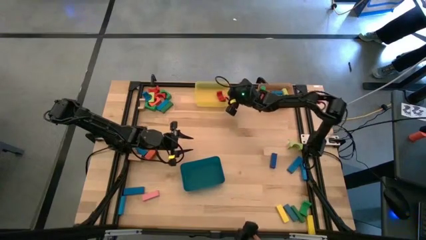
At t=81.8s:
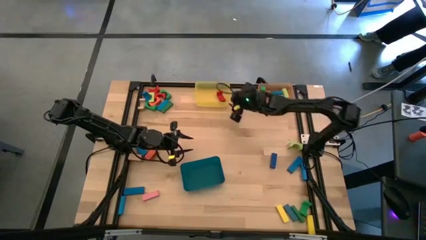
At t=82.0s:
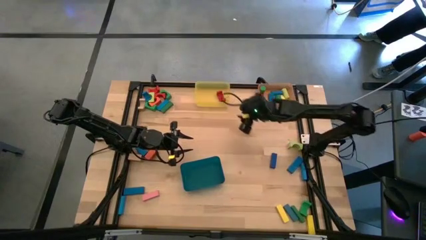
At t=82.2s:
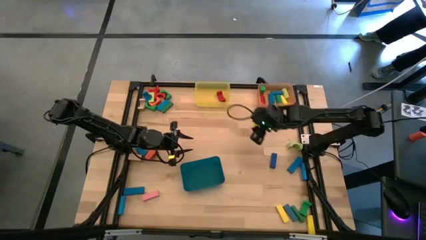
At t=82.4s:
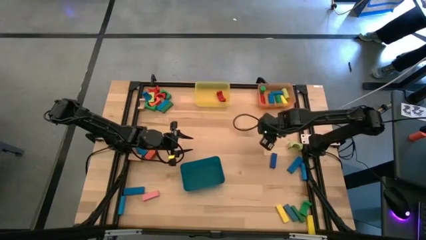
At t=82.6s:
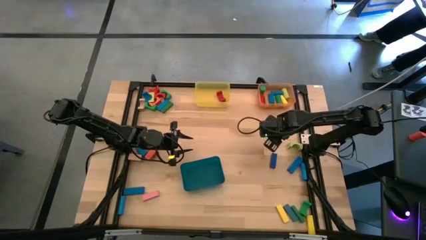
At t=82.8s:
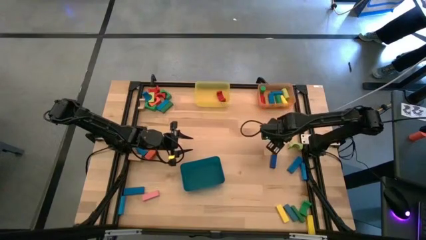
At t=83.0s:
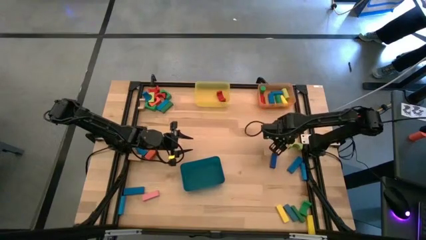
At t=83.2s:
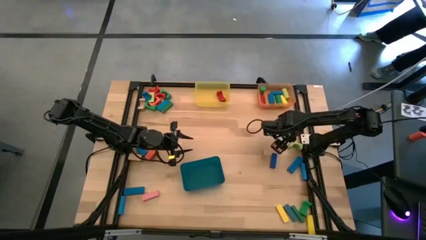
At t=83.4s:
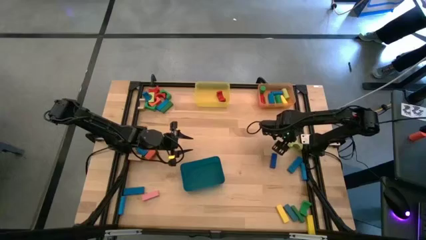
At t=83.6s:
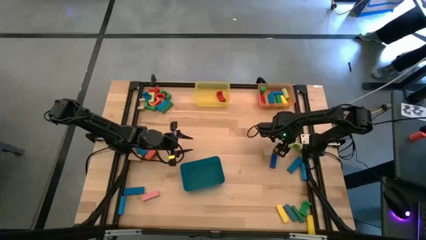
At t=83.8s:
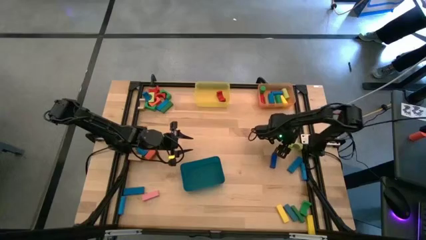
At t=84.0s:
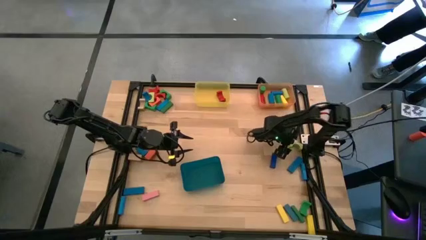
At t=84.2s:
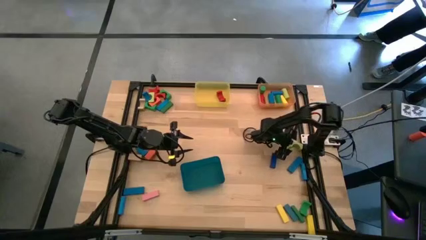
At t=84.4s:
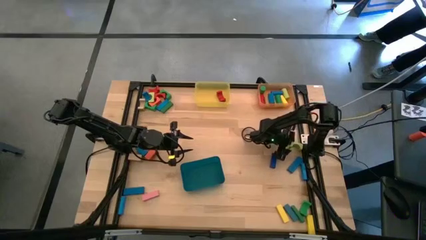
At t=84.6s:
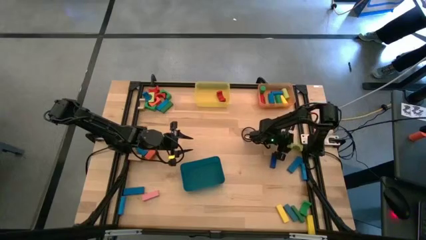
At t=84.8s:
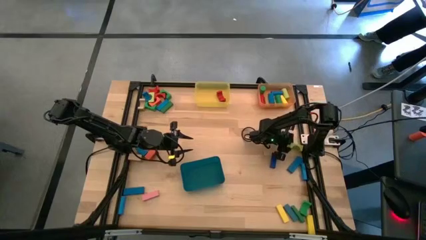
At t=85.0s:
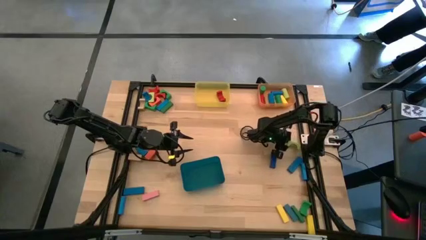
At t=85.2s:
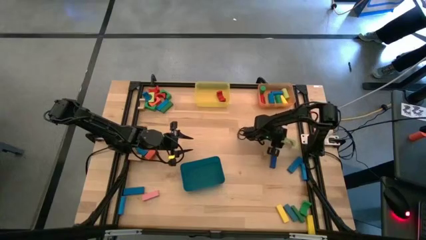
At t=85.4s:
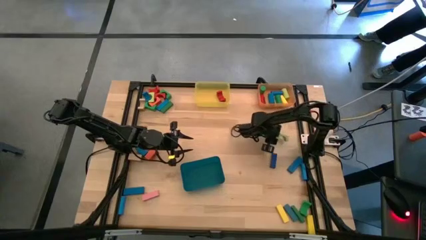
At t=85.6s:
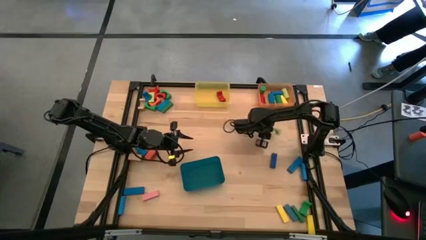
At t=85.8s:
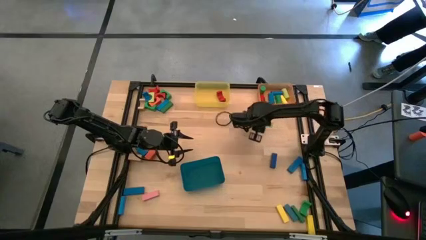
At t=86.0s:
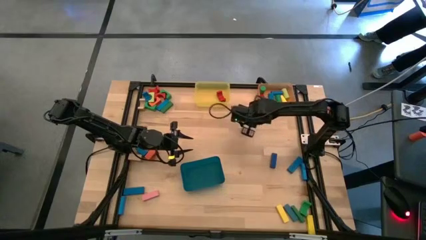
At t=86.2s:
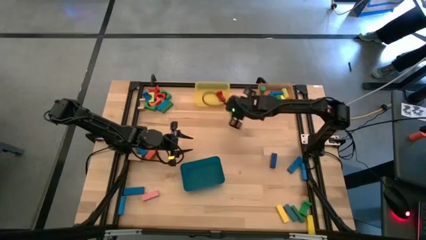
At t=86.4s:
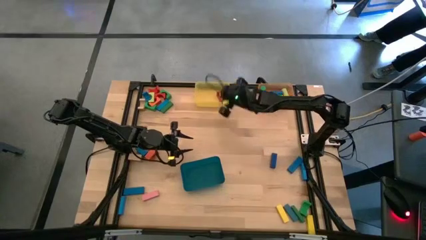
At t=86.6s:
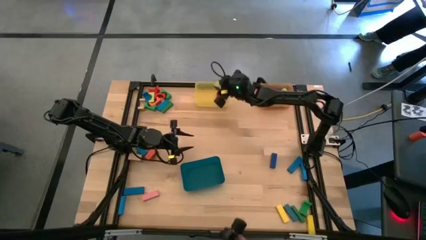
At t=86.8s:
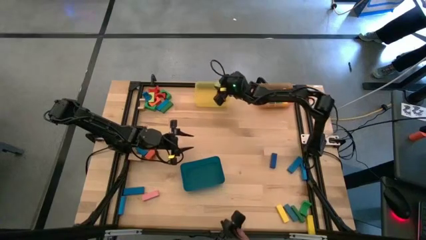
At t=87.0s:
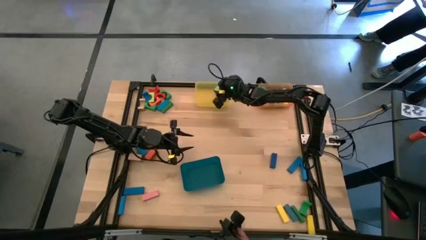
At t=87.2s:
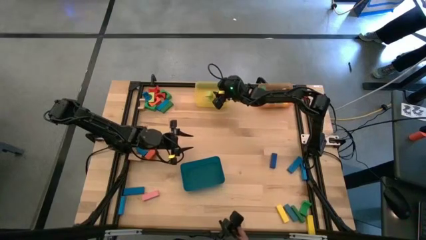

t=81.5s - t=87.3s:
Task: Sort blocks by size
Put the light green arch block into the yellow bin

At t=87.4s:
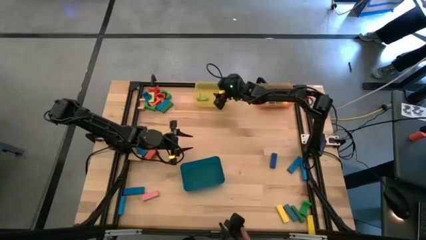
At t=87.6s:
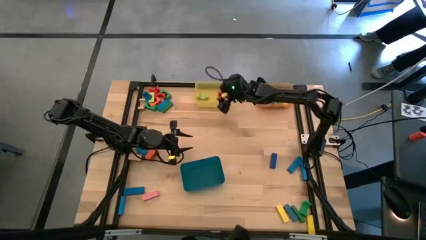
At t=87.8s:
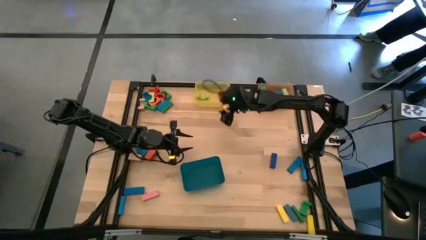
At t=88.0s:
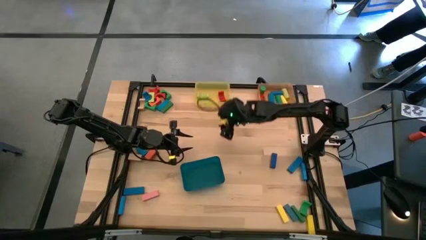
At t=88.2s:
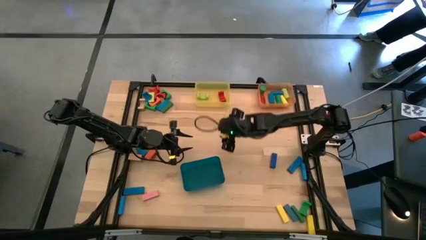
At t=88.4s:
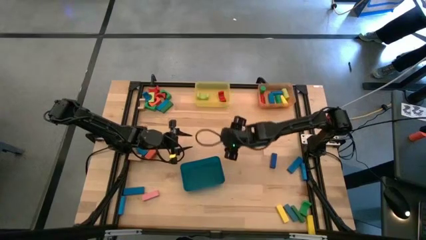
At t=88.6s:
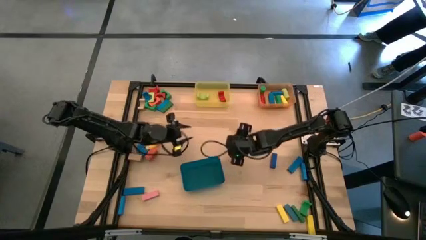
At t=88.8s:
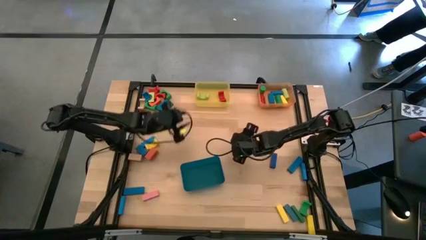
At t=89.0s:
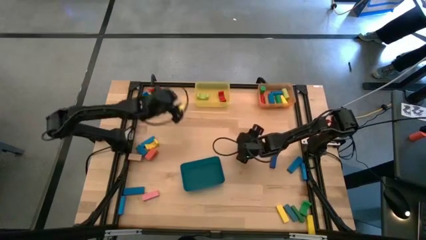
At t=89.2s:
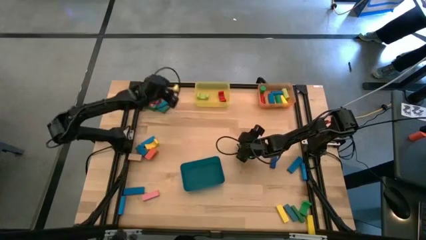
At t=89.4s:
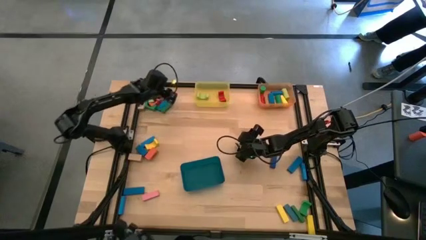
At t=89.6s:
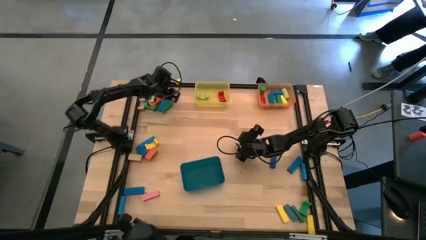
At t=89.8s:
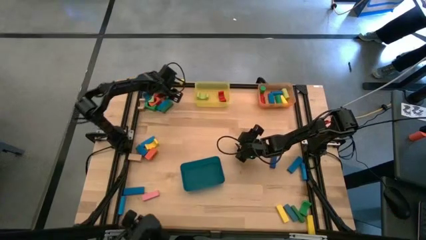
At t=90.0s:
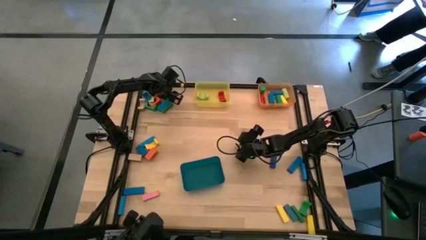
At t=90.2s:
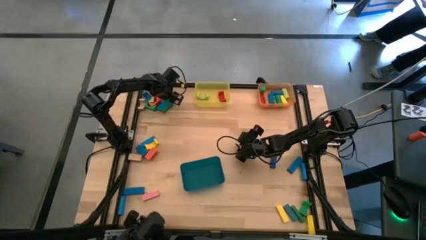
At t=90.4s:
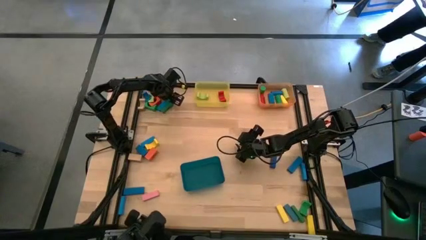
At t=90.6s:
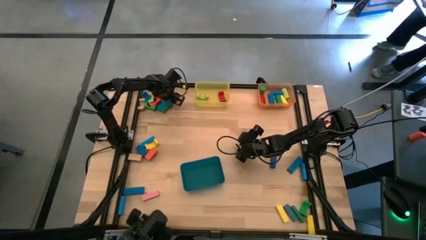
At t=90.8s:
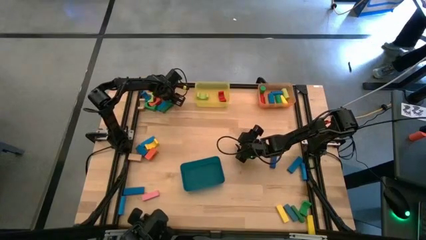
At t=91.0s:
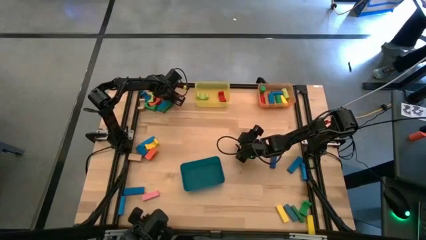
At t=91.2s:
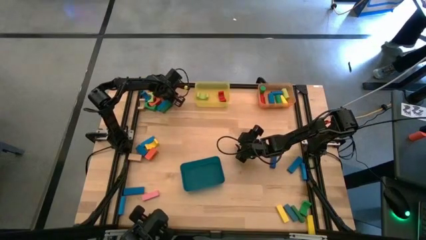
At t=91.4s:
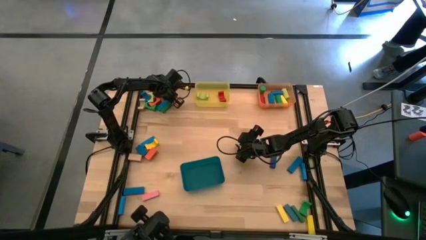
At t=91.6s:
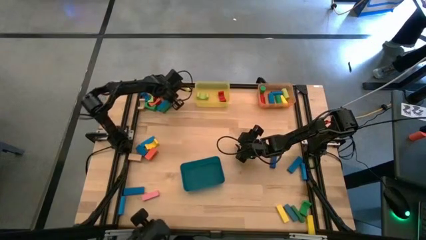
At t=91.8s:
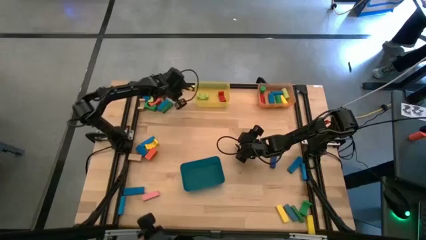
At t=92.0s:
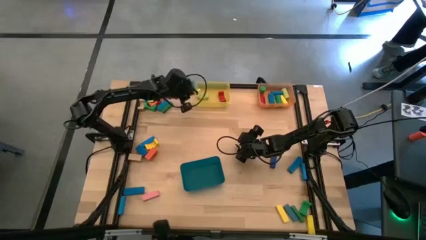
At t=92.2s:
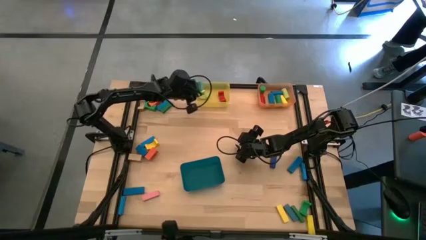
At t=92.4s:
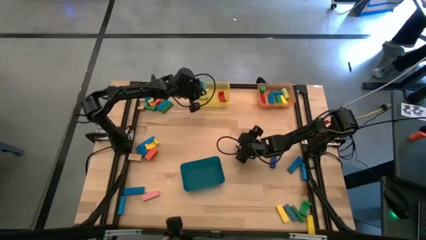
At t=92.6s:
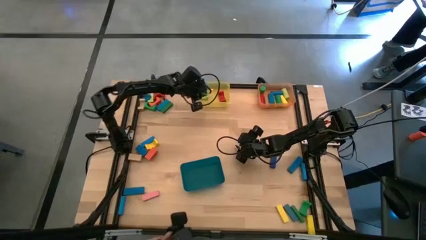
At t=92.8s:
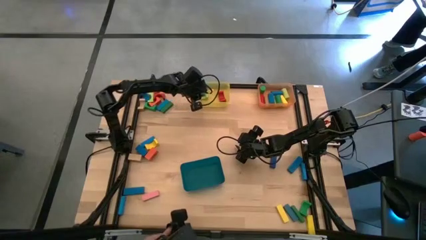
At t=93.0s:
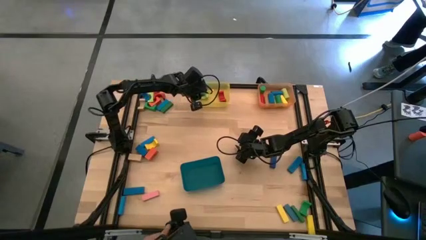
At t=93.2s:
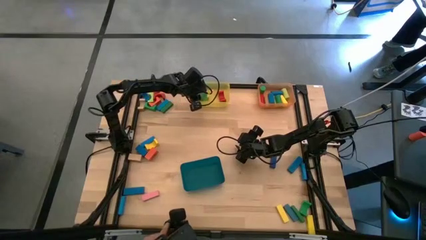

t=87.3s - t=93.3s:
Put the green arch block into the yellow bin

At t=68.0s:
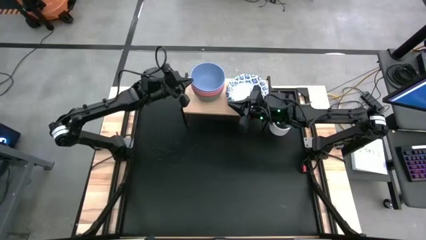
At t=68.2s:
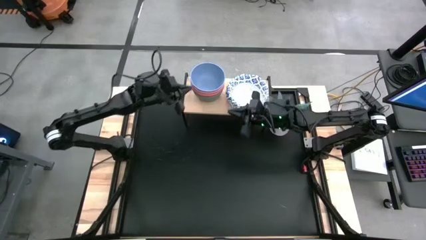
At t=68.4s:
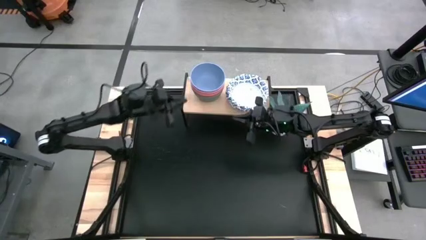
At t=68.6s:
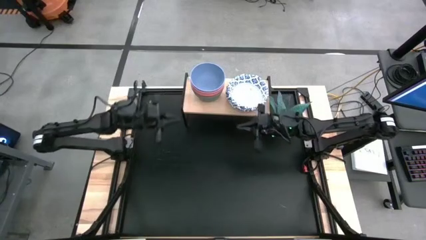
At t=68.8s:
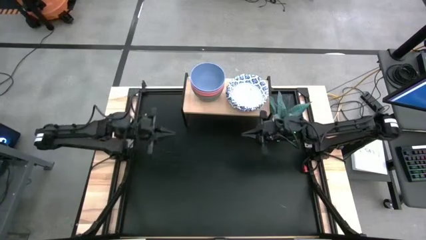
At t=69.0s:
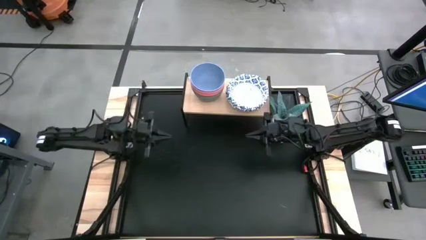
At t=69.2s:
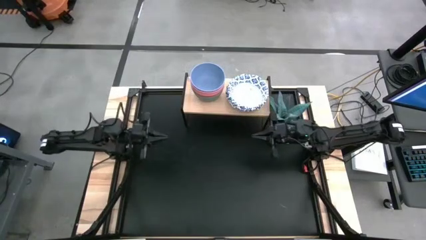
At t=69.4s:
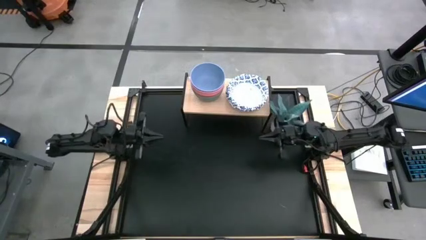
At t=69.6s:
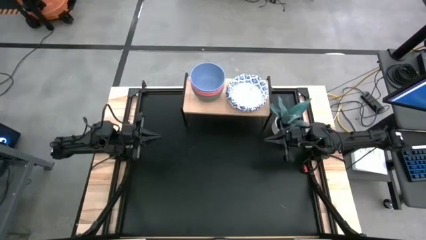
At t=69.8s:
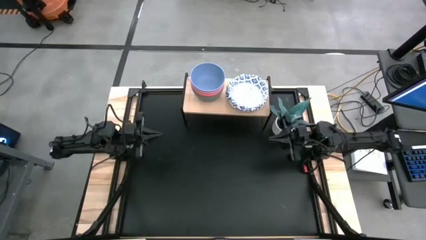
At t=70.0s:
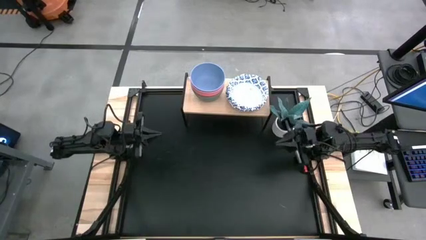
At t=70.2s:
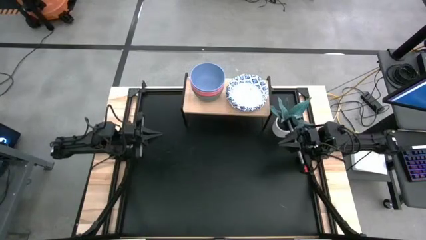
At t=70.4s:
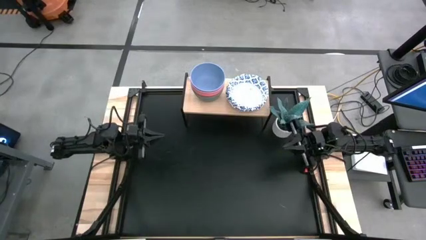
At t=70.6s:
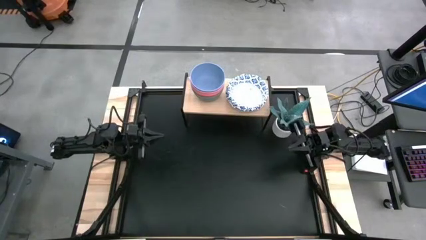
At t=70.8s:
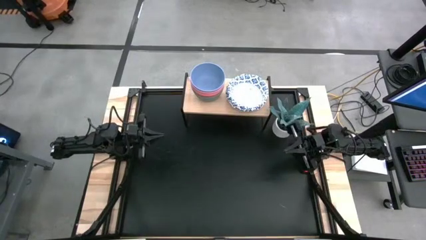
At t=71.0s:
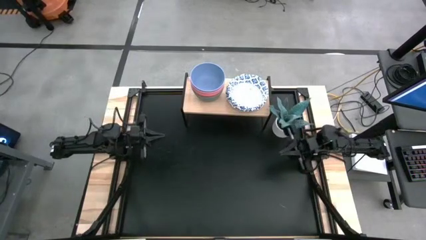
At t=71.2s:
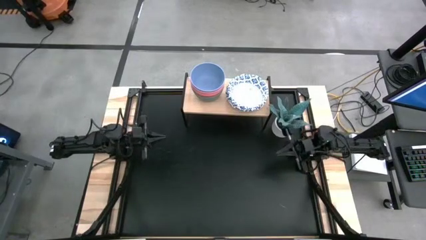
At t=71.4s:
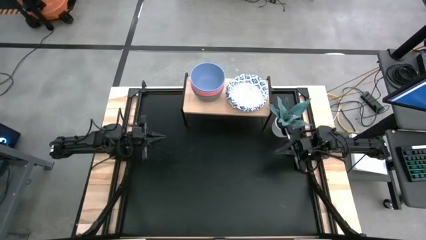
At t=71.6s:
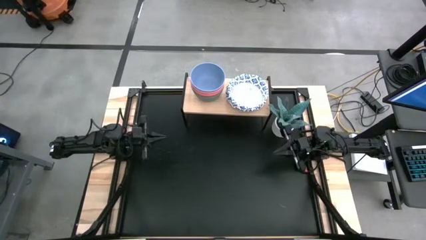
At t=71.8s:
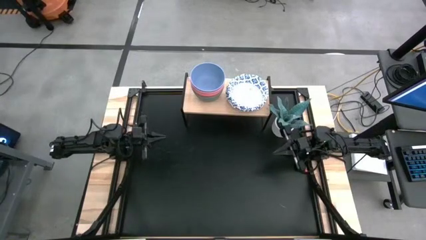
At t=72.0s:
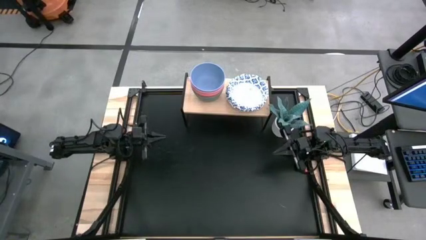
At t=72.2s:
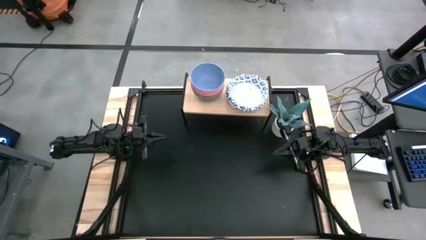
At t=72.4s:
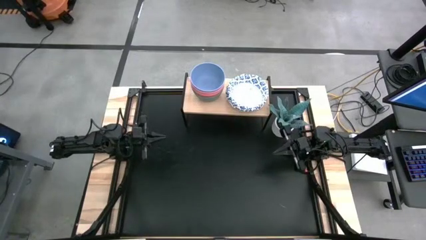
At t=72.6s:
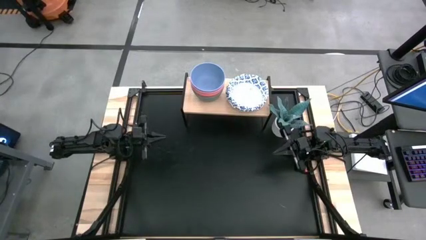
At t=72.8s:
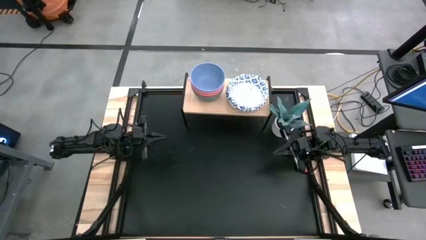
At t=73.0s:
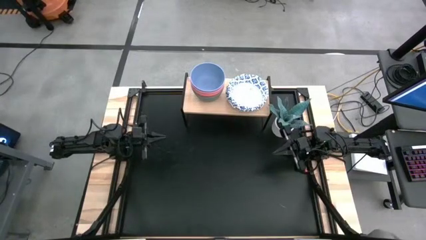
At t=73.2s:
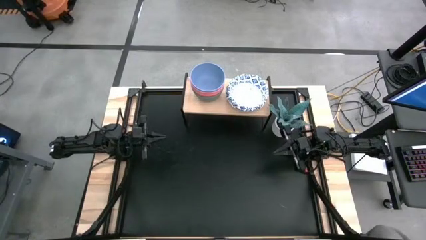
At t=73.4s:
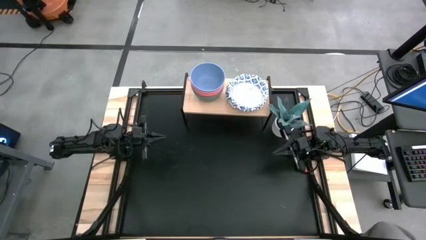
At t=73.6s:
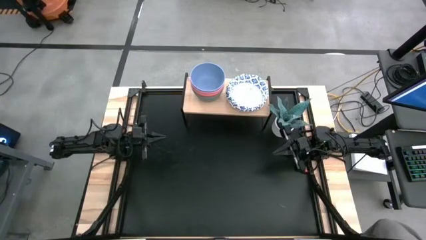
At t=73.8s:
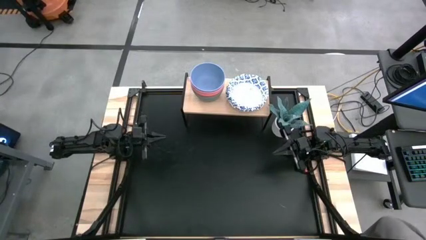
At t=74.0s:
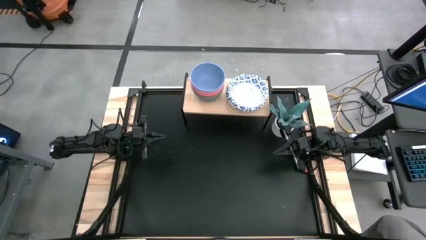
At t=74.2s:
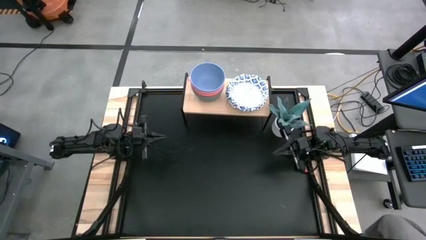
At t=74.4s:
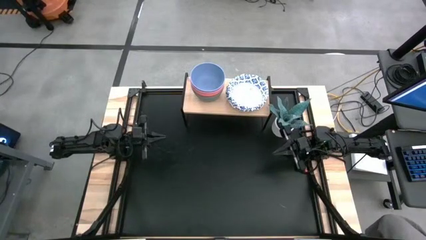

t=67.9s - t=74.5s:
Task: Place and stack bowls onto a shelf
Return to Home Position
